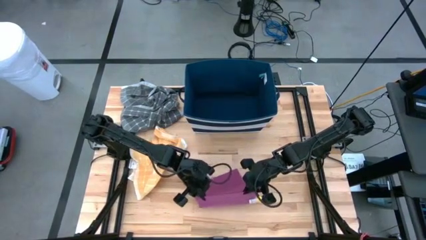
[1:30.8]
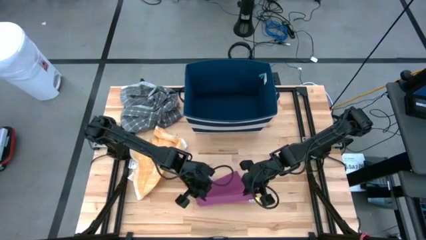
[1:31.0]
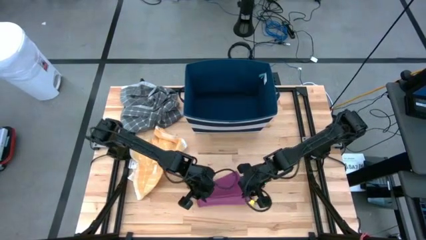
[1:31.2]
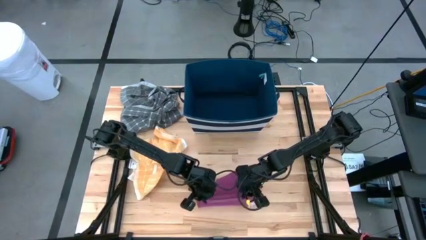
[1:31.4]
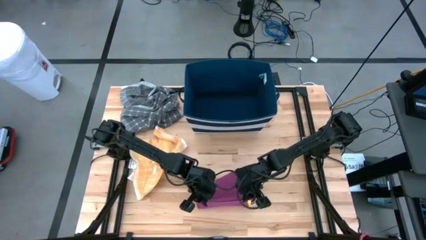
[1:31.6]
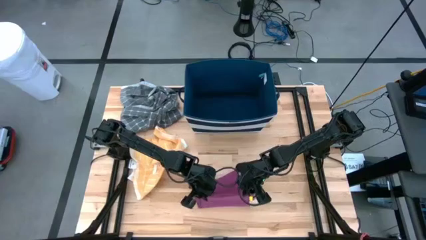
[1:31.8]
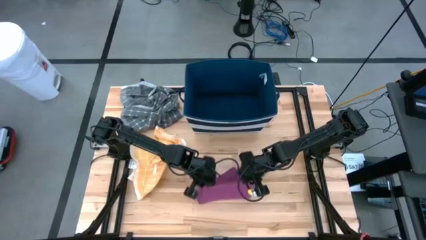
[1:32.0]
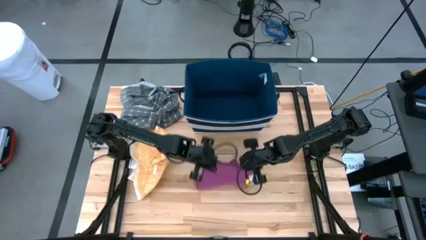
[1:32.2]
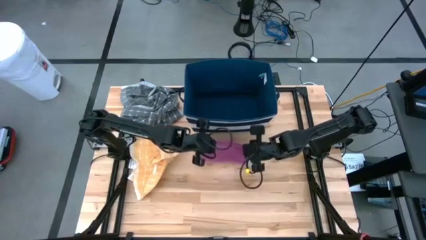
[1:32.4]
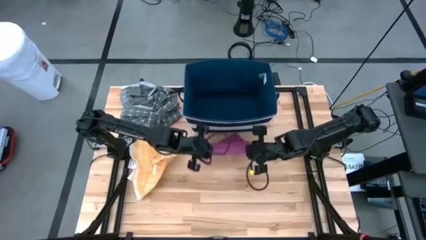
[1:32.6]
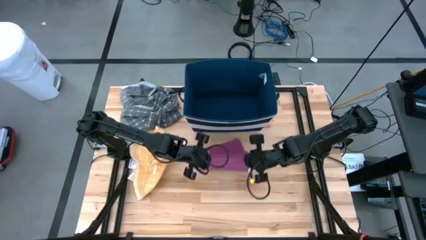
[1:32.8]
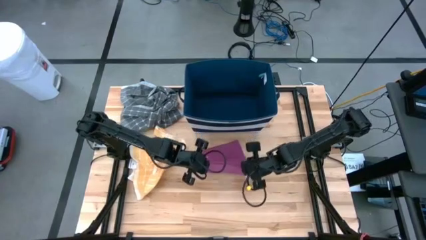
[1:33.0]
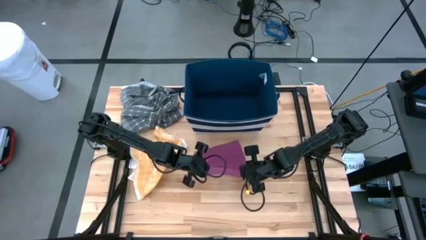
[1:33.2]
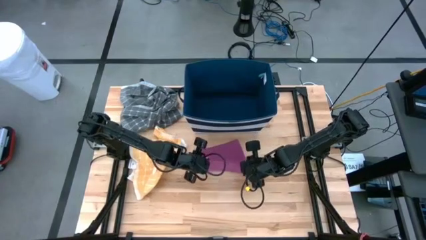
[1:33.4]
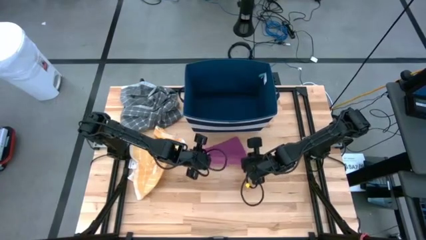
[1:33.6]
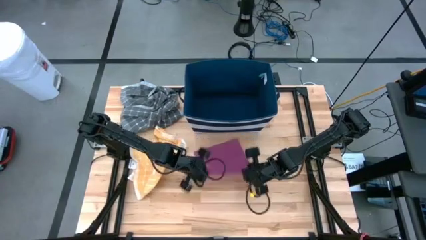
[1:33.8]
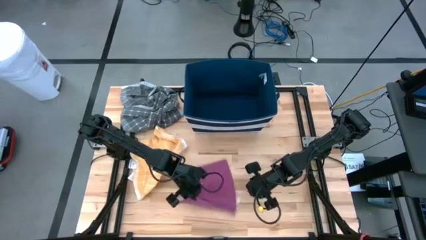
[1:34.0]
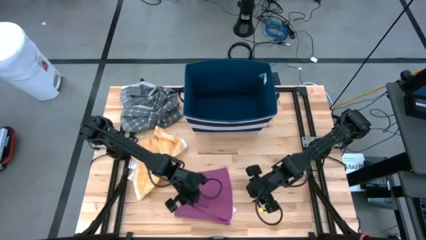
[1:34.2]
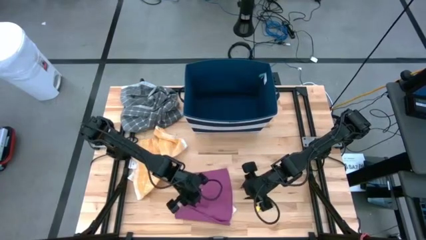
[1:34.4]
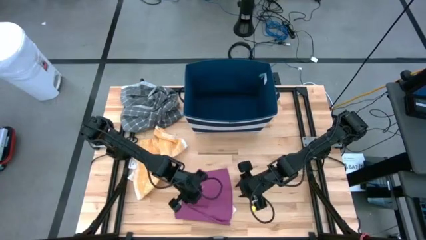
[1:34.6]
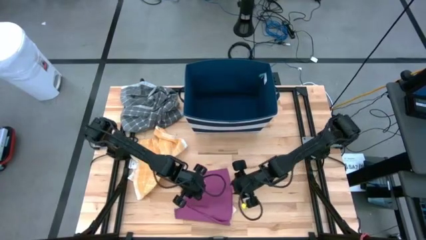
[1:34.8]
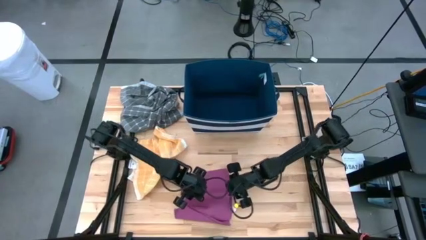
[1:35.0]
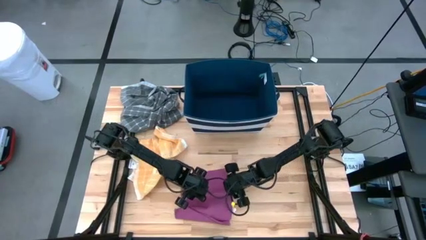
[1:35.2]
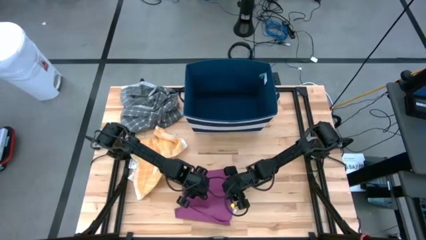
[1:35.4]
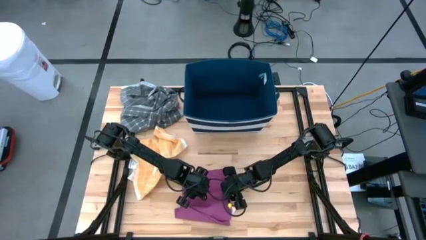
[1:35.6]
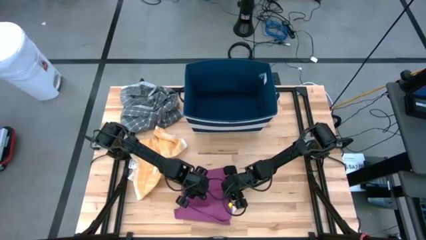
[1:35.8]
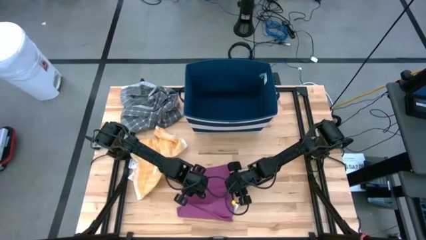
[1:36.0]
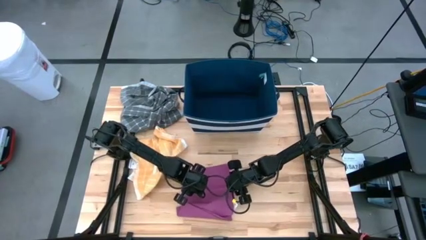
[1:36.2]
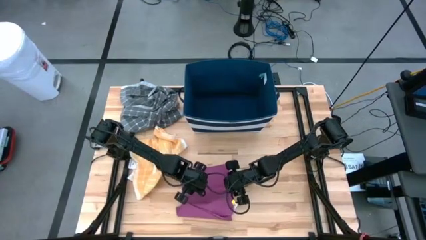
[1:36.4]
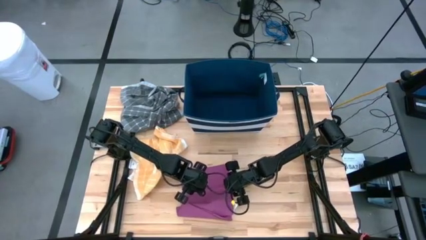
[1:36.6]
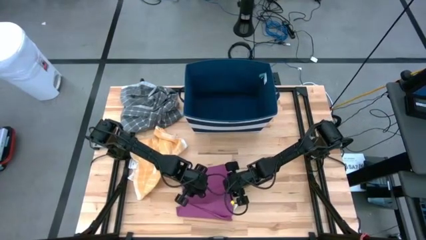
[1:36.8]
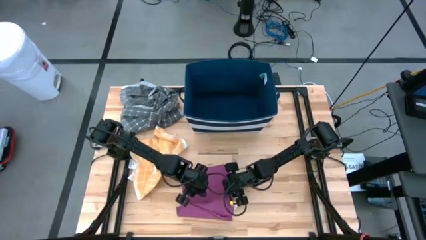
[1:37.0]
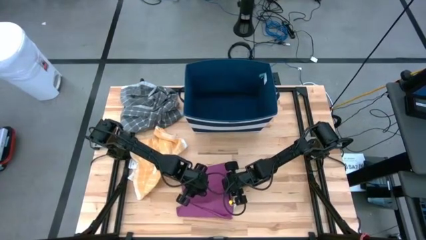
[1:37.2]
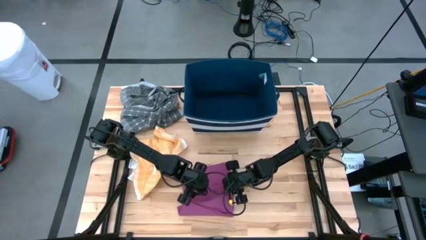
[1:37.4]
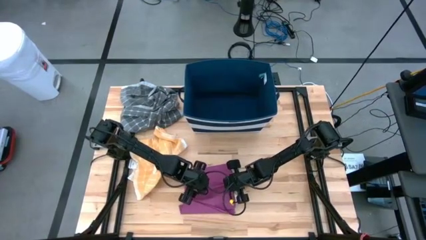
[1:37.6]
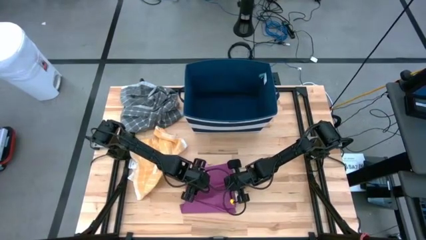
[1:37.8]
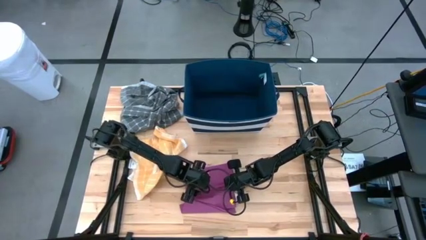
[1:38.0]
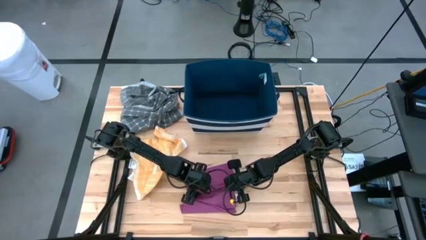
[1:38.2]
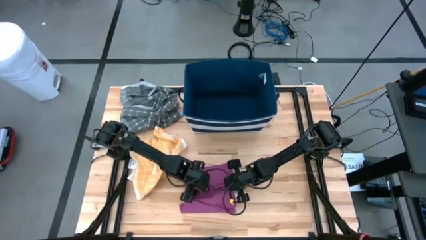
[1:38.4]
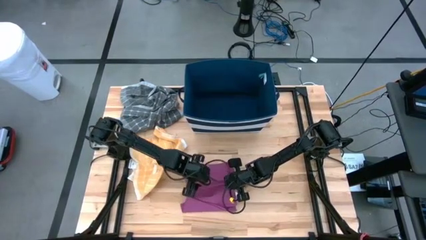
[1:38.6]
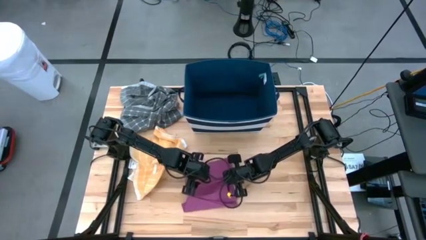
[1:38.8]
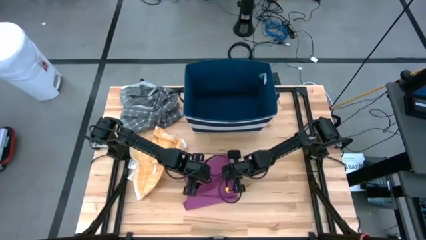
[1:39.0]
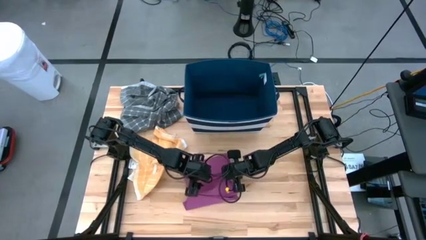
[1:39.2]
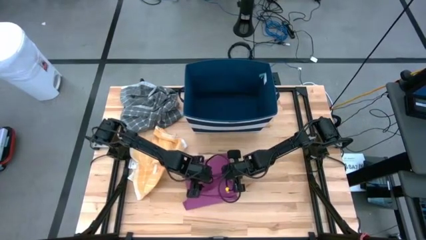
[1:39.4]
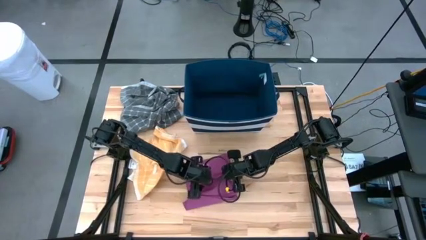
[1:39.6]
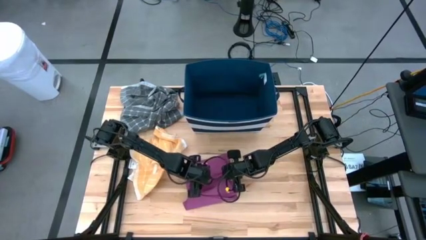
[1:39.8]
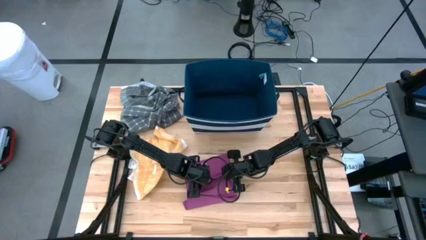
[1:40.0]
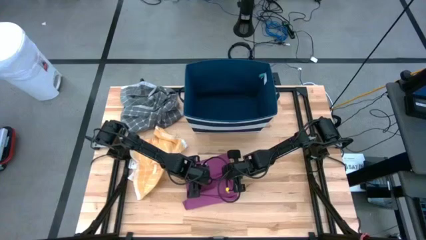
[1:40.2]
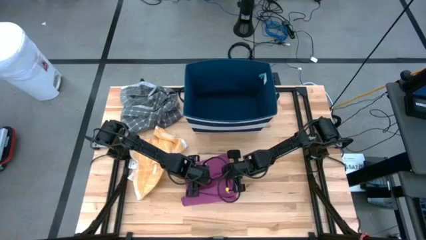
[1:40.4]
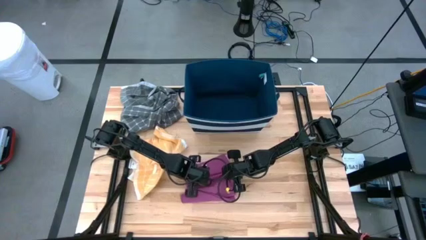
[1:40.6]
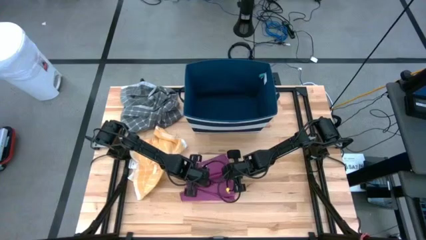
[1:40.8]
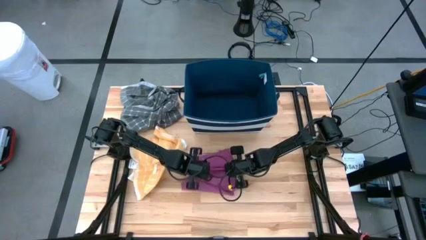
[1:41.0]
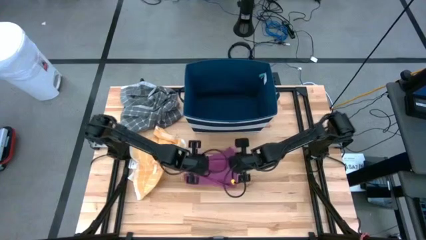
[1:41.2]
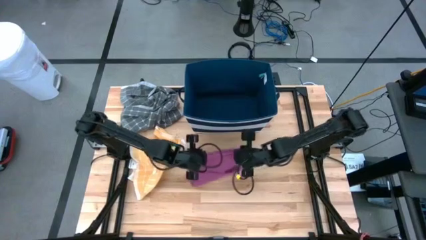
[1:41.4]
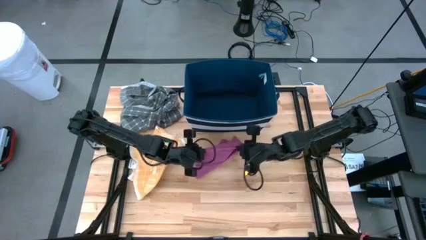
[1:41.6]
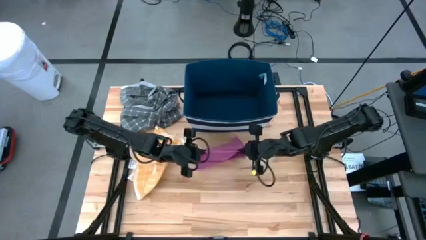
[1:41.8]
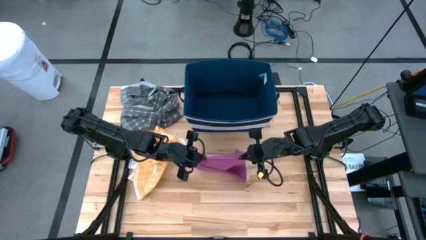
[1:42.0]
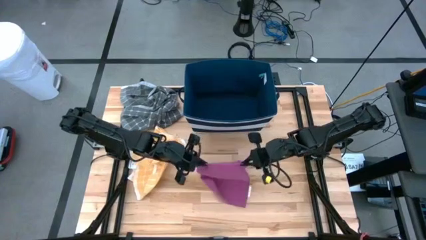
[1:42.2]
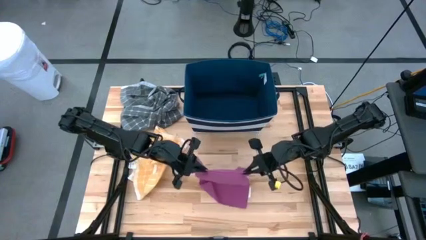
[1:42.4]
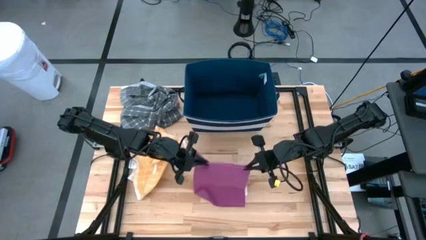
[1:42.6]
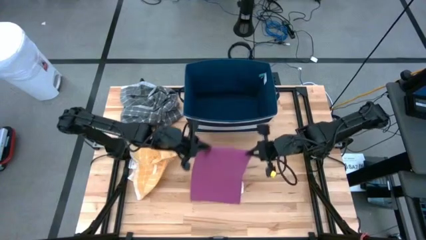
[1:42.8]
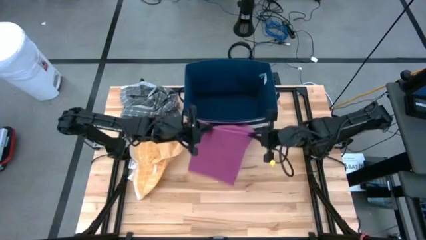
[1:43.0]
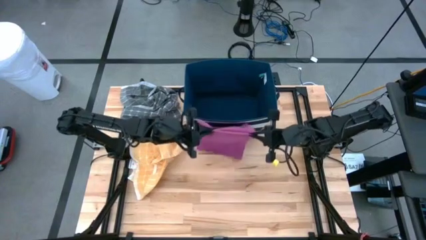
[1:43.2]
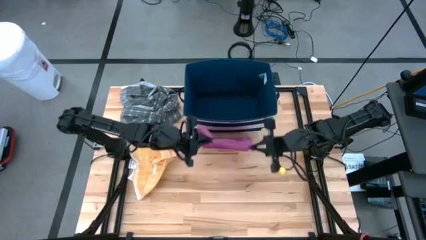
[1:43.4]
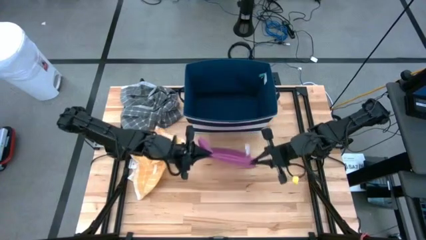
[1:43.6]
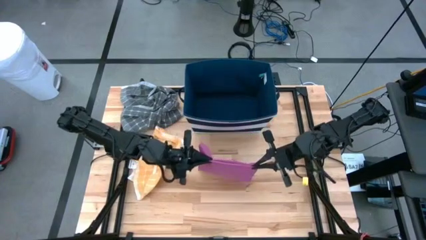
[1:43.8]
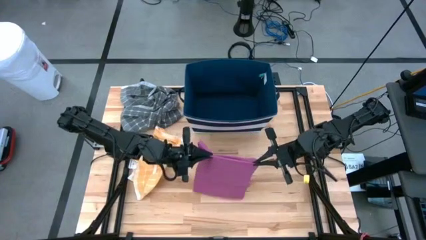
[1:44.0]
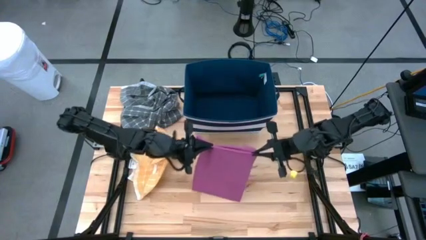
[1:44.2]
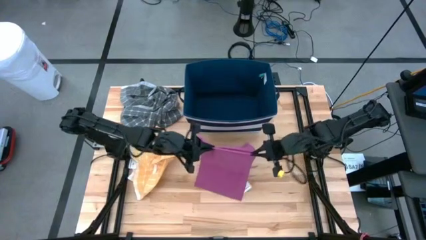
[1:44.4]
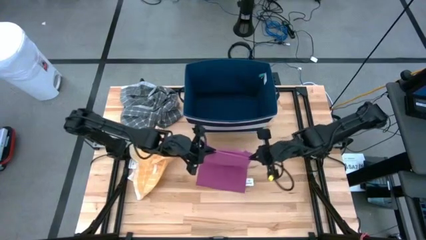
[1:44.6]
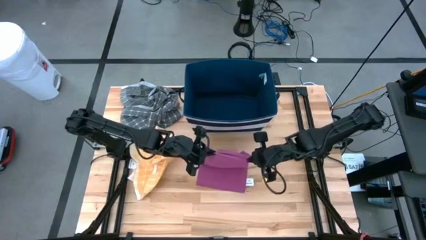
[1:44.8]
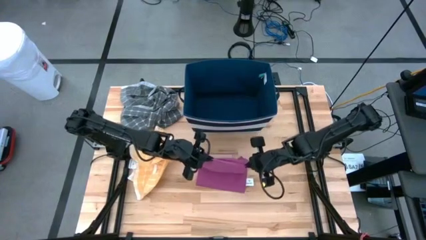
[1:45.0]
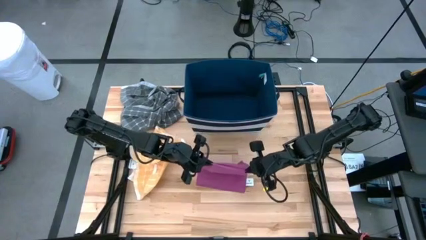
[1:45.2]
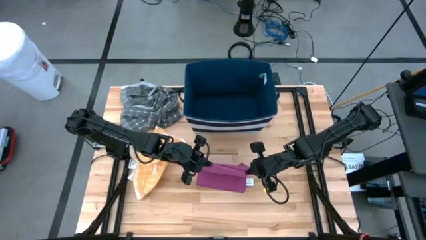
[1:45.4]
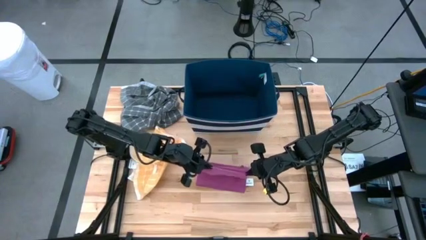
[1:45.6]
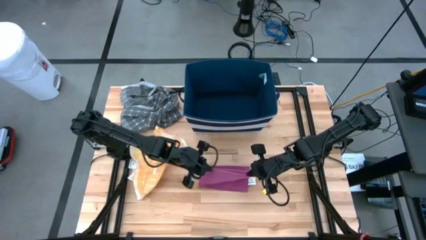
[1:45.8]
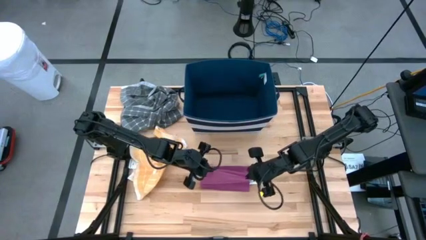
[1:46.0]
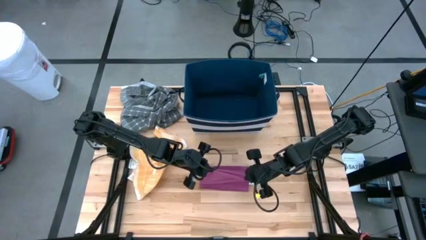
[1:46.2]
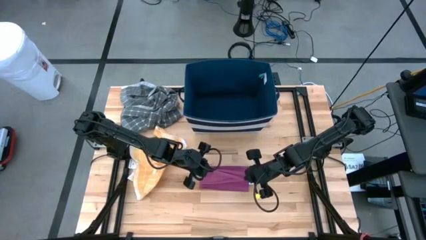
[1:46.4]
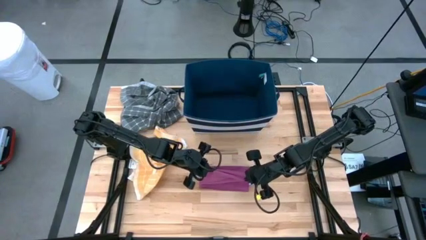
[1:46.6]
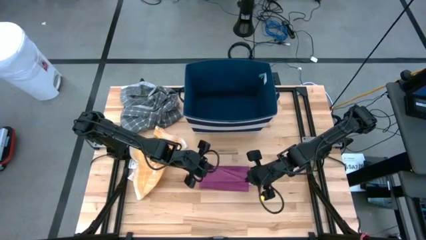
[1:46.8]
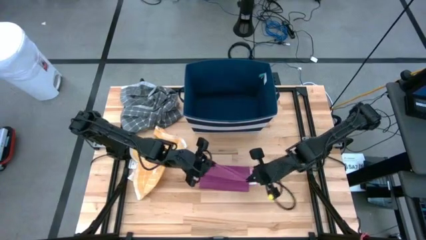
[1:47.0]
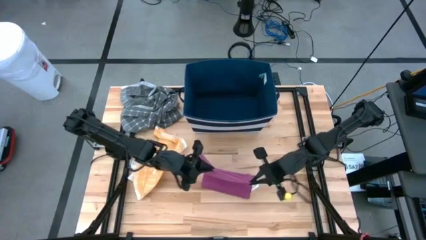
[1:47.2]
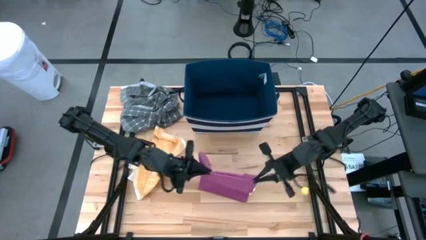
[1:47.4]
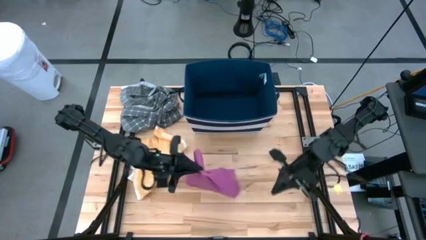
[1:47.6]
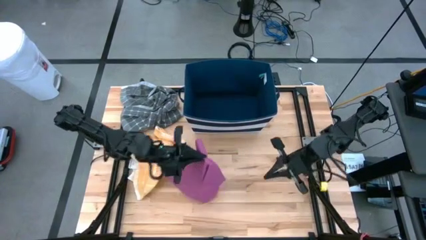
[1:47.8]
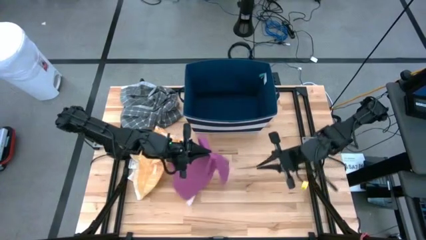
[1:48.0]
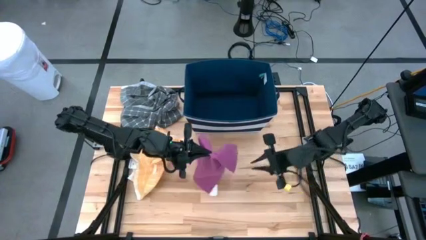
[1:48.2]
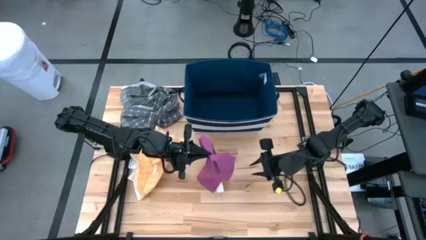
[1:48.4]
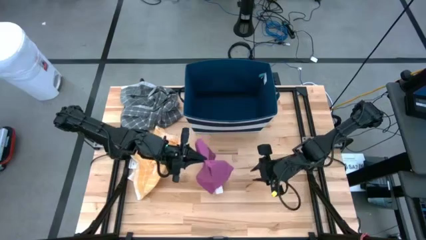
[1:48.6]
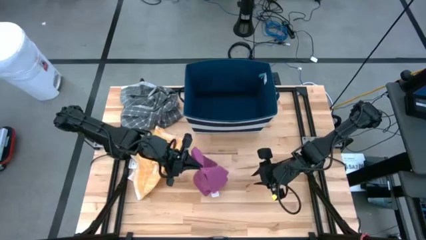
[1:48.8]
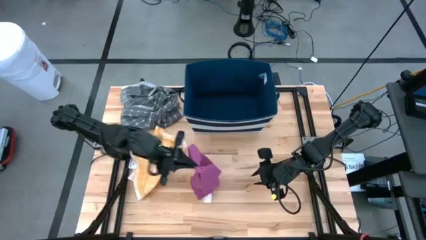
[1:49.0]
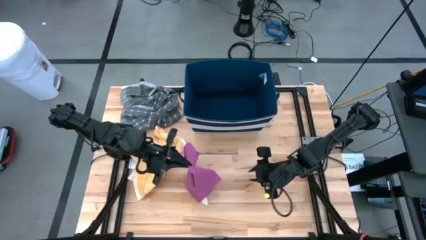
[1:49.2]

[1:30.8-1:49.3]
Task: Fold towel
Fold the purple towel
